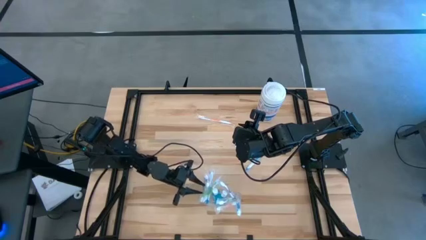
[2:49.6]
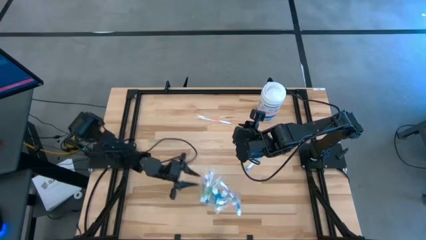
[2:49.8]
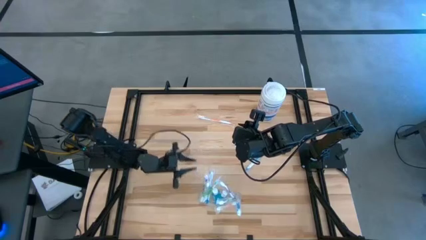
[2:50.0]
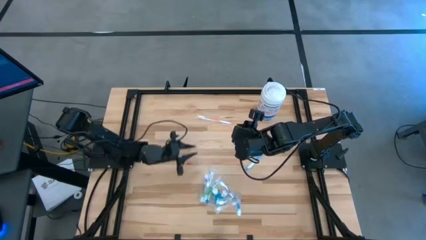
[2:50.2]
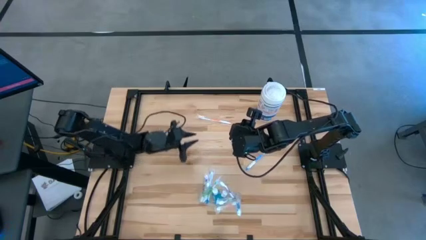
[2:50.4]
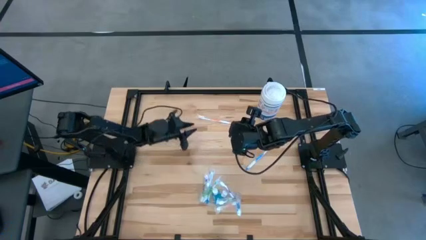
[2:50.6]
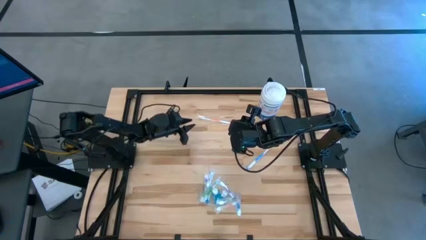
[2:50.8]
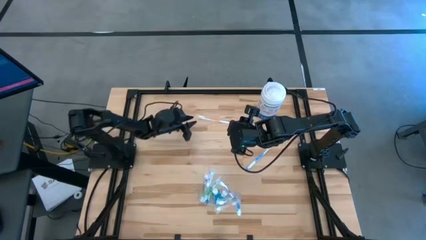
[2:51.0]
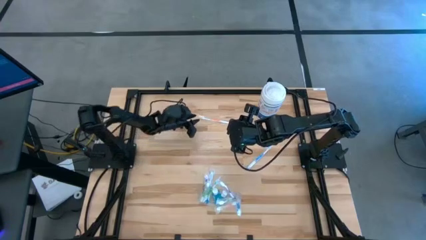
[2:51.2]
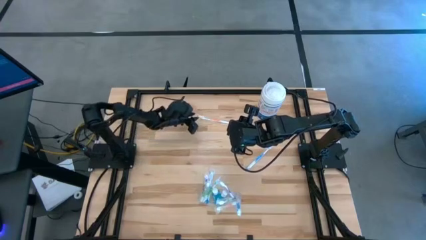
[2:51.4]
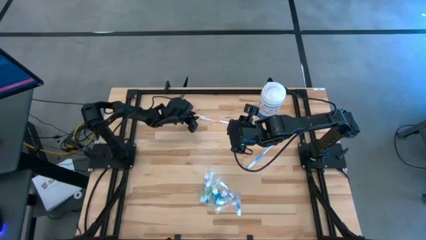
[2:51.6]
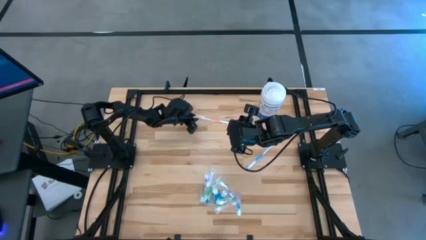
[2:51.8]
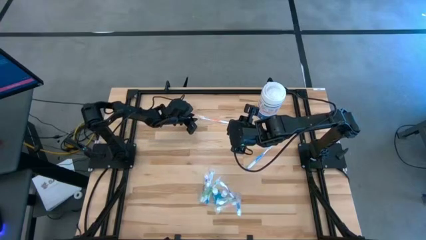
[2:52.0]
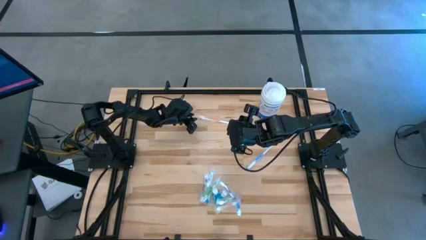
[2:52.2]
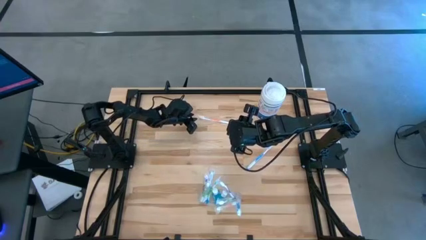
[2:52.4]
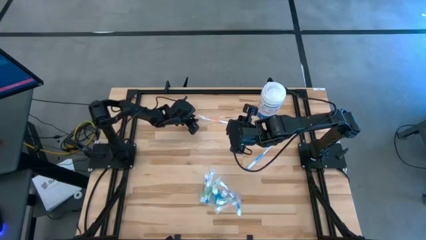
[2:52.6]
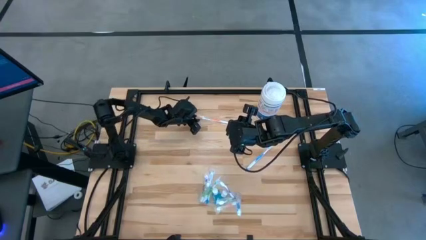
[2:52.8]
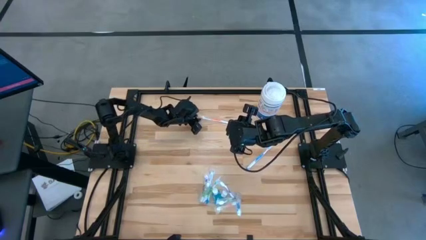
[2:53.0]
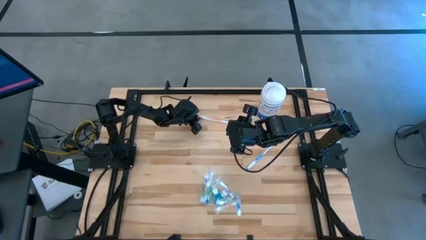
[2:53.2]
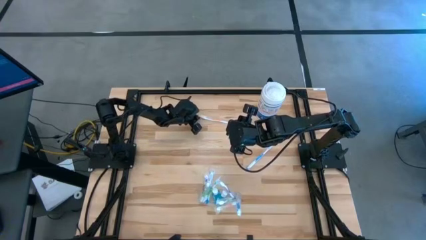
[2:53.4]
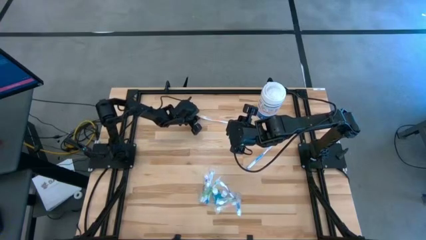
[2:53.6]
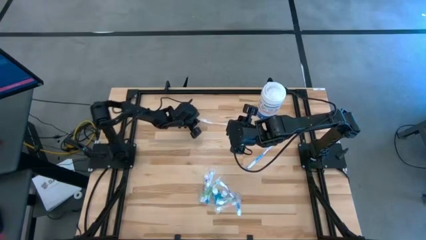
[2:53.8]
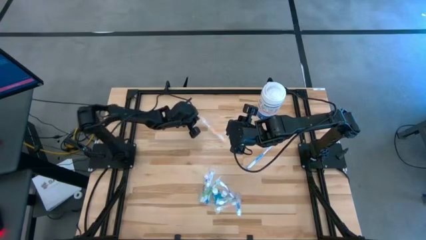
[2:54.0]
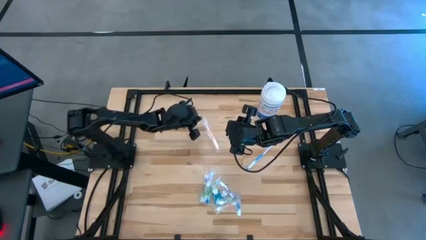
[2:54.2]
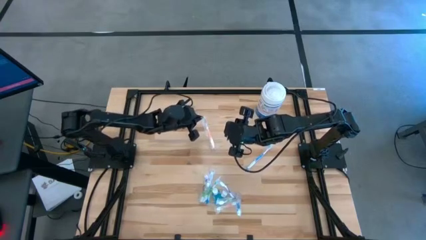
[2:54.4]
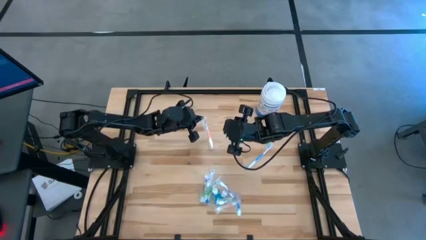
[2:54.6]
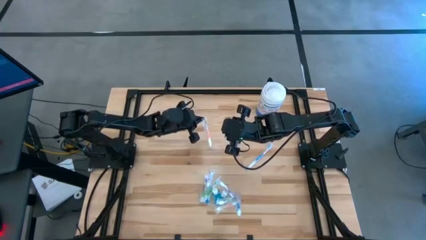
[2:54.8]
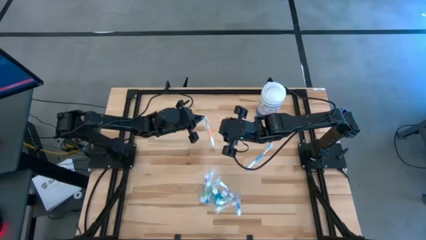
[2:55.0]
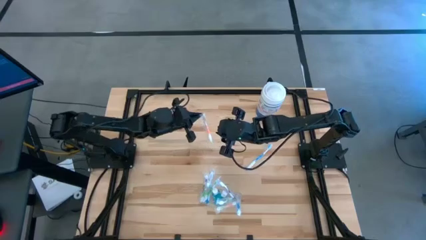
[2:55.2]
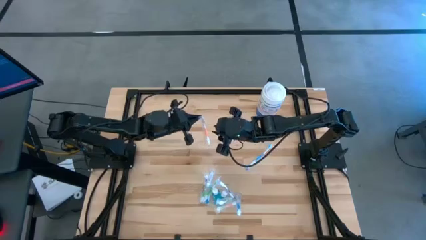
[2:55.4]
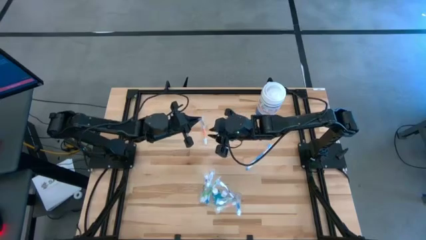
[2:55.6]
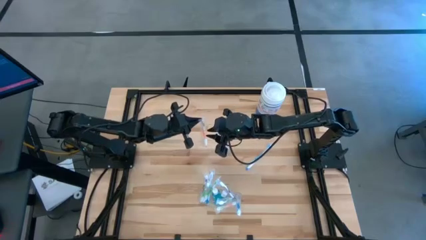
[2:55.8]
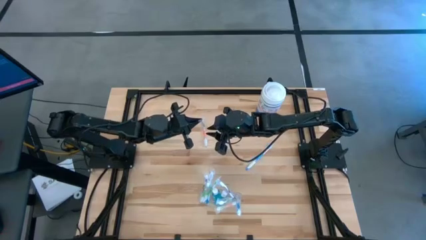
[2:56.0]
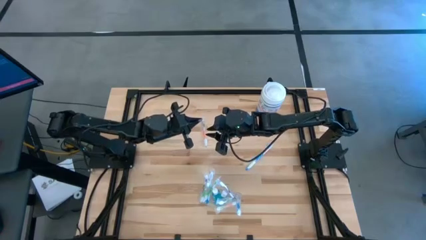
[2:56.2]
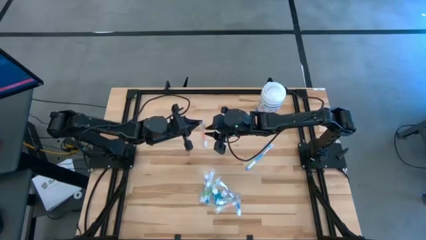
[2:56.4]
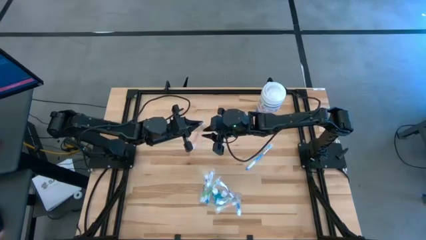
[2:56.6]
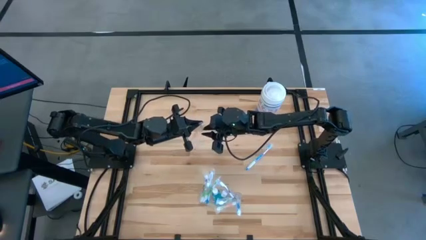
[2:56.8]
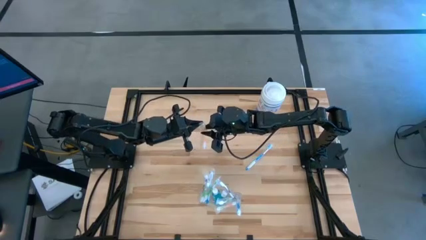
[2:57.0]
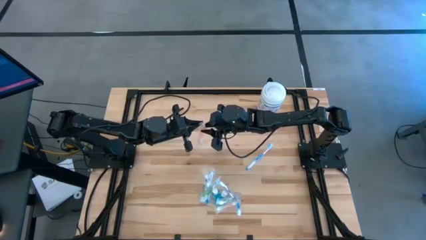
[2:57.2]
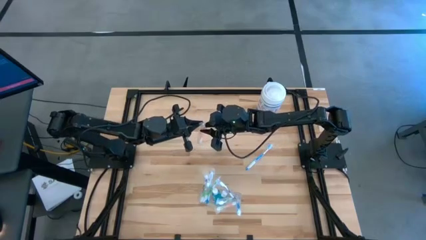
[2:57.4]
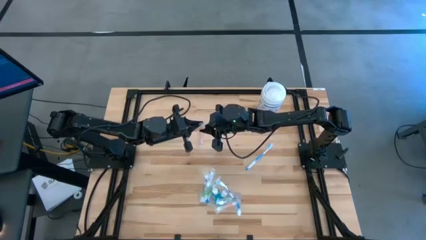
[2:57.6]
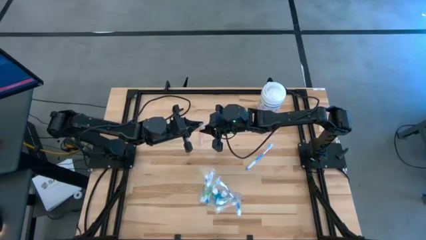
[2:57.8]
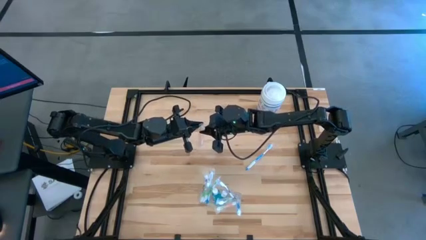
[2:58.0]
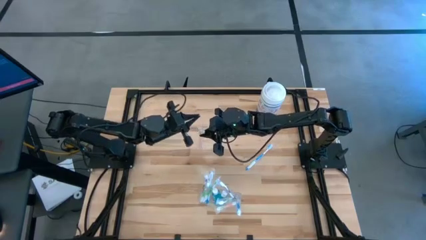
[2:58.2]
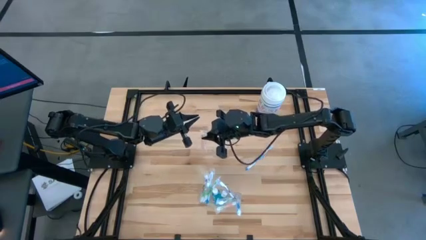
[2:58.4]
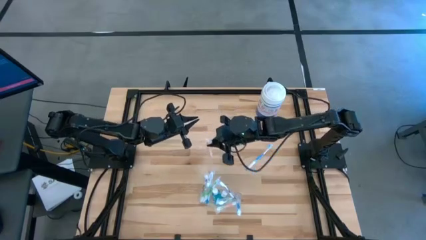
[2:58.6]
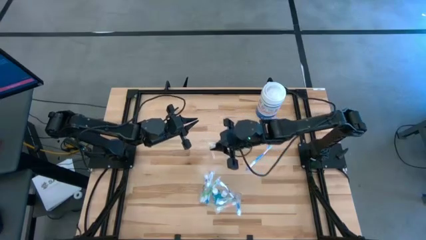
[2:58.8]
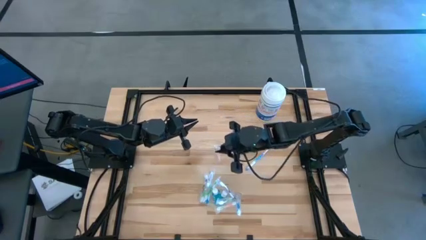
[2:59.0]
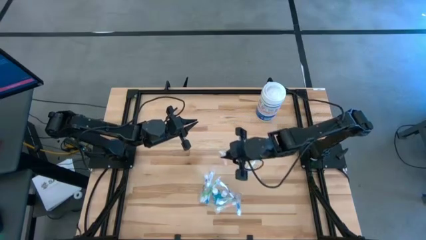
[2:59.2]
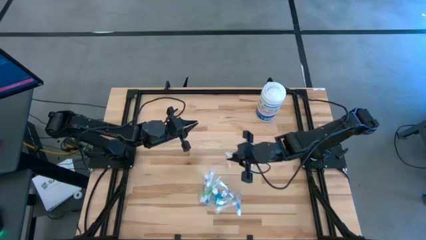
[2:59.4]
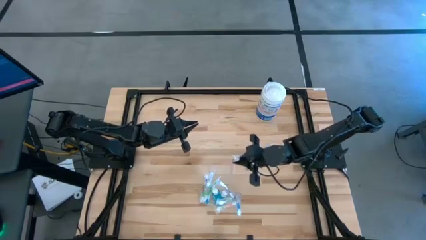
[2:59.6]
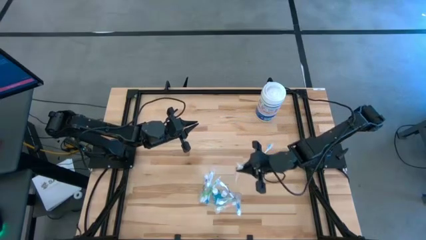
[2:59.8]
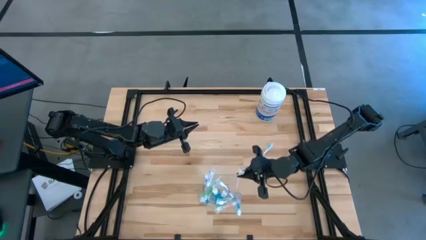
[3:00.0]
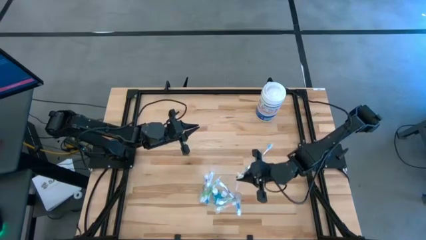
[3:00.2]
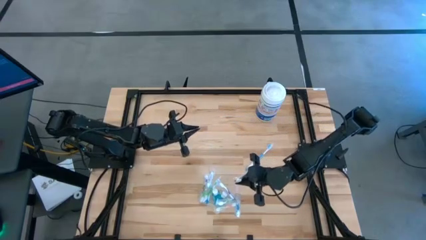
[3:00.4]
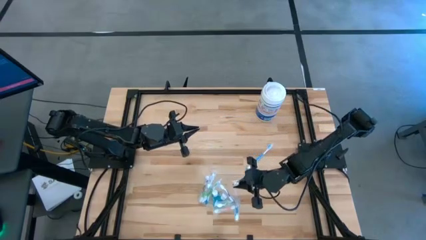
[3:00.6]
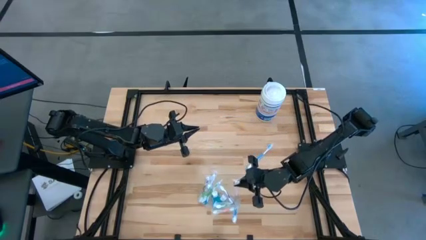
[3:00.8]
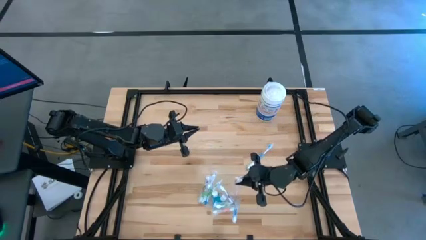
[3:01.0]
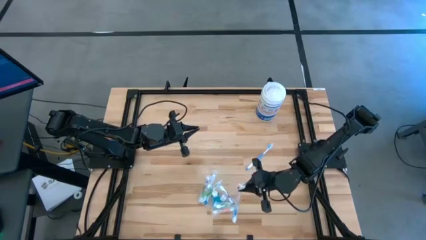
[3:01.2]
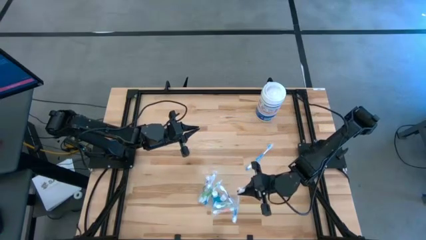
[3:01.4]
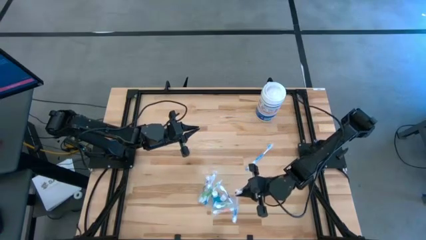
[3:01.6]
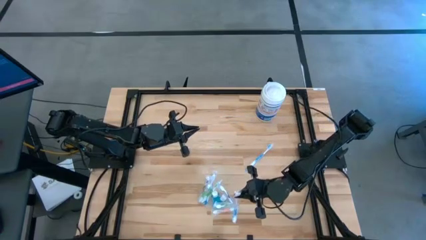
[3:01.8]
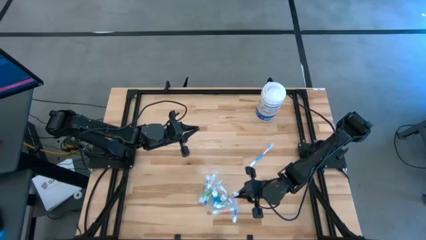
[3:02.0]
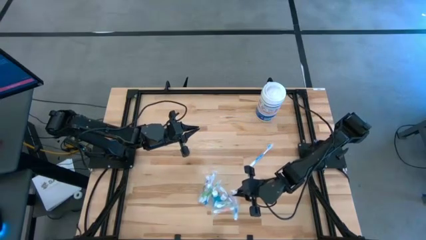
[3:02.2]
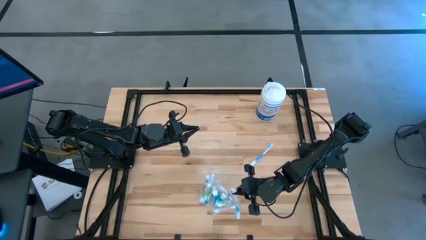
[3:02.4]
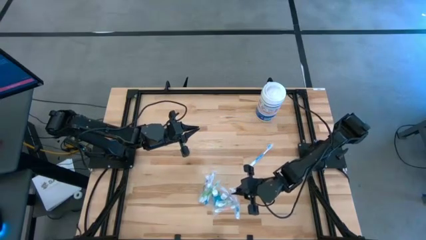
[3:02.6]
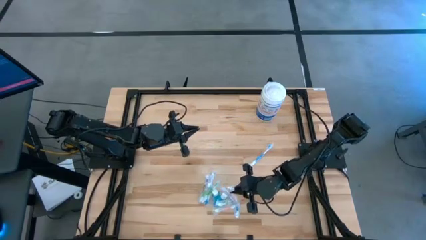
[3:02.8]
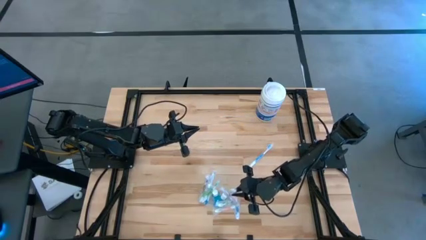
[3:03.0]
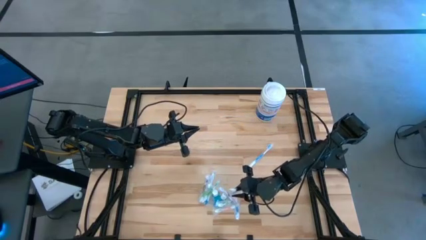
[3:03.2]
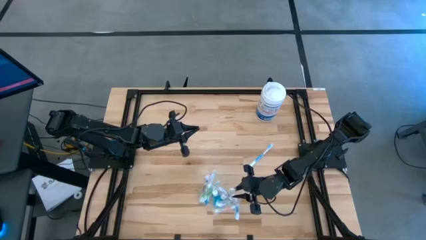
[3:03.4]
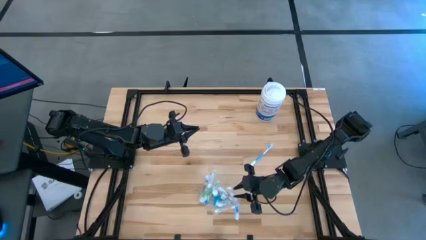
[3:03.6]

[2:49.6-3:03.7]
Task: Pick & Place toothbrushing station
Put the orange toothbrush into the transparent organizer

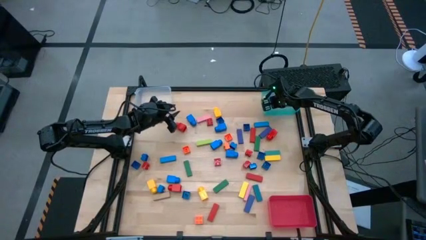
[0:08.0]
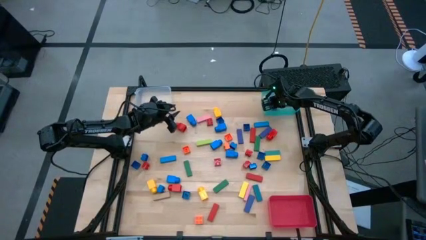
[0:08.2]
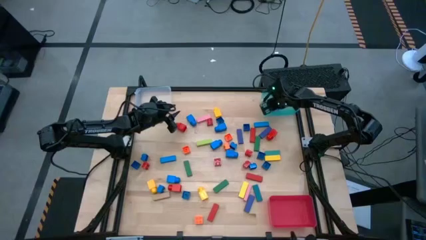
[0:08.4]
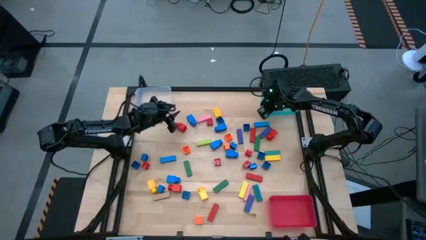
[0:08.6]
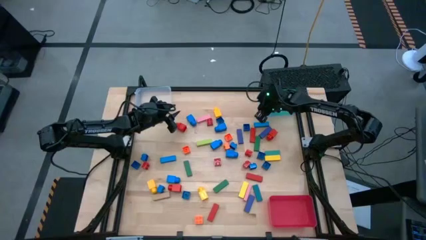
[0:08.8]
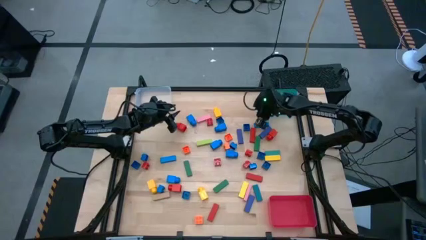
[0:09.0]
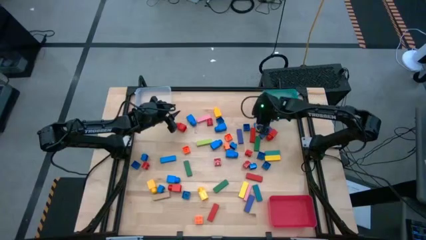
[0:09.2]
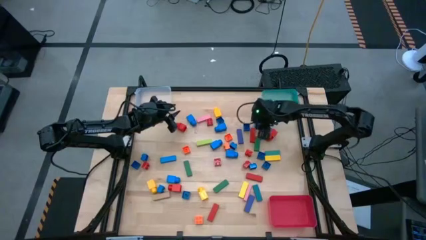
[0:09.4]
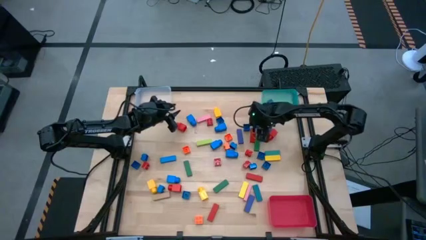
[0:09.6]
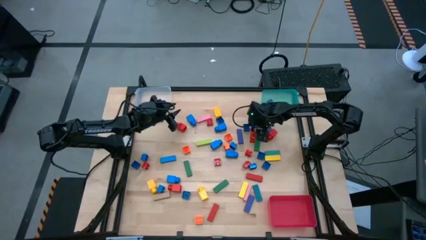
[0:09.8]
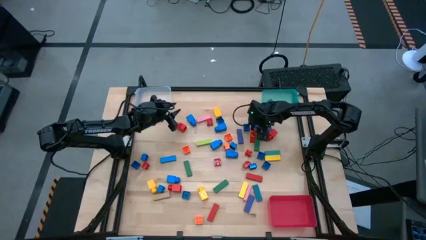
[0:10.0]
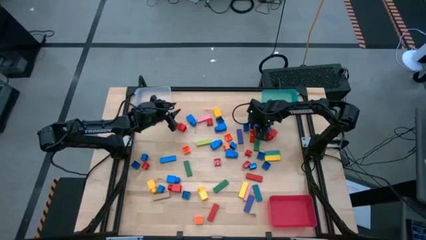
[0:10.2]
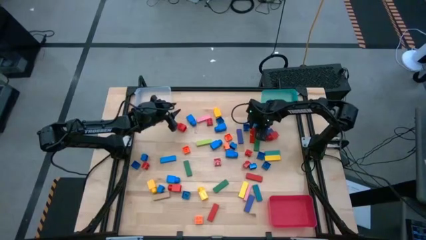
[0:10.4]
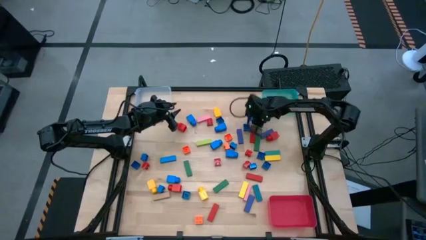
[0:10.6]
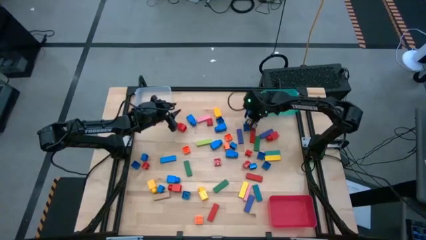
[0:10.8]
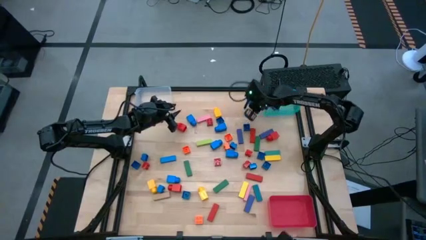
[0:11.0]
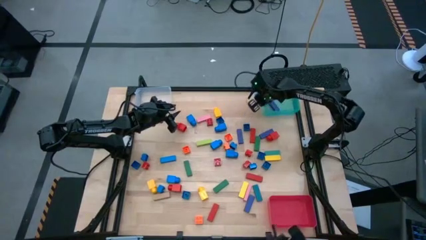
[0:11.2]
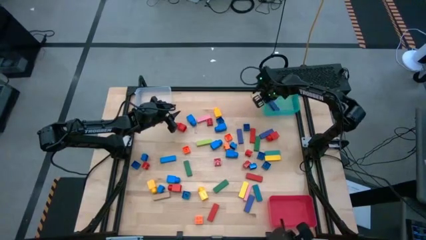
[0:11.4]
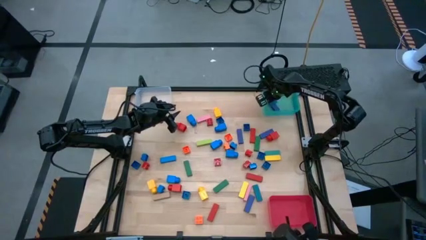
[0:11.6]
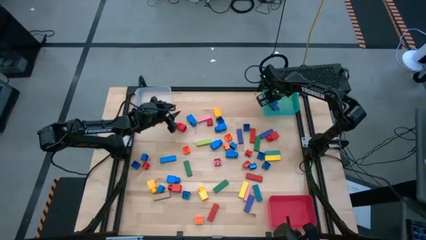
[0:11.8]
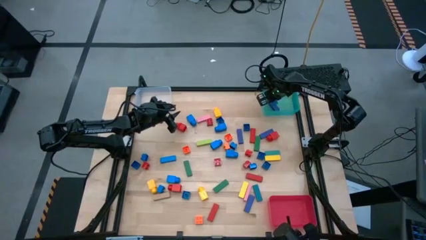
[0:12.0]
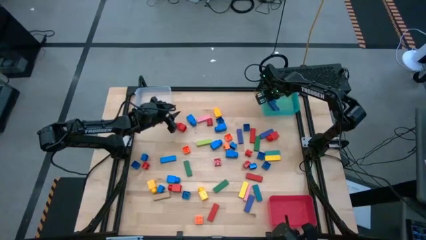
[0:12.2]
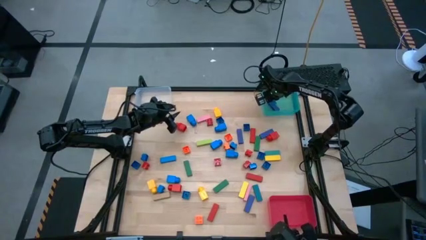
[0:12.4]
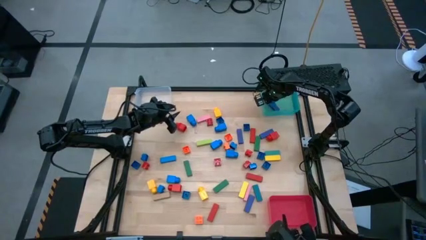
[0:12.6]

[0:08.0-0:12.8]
Task: Sort blocks by size
Put the blue block in the blue bin
